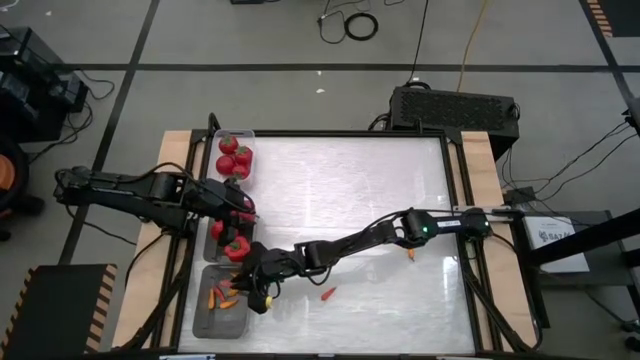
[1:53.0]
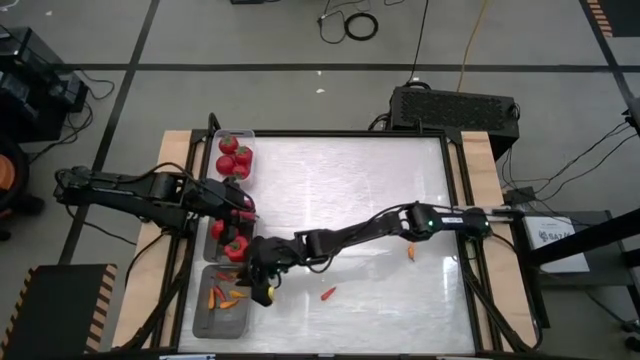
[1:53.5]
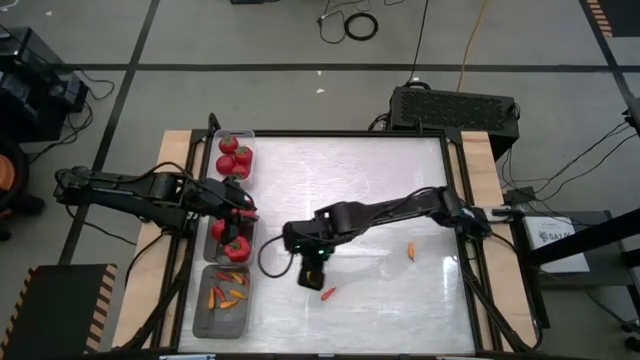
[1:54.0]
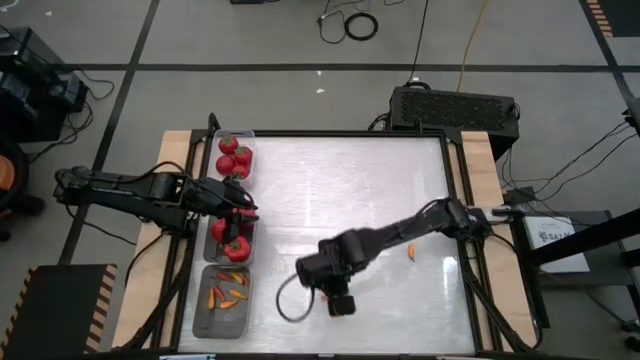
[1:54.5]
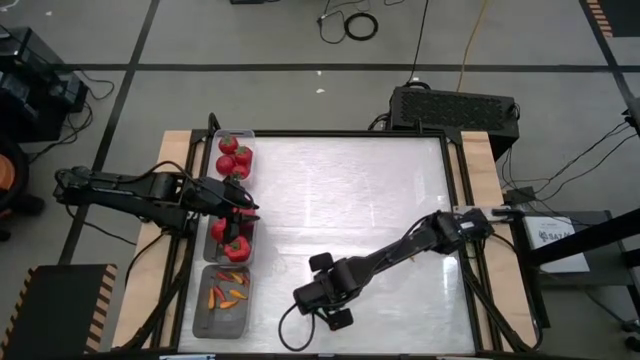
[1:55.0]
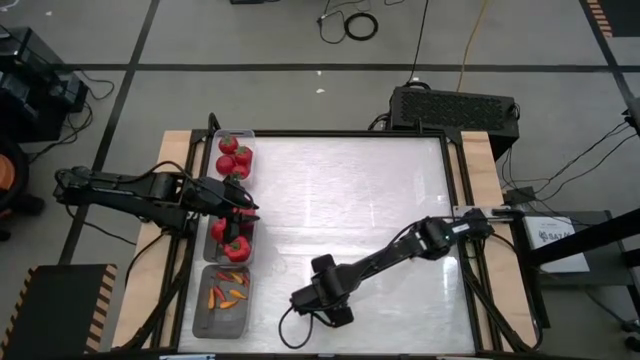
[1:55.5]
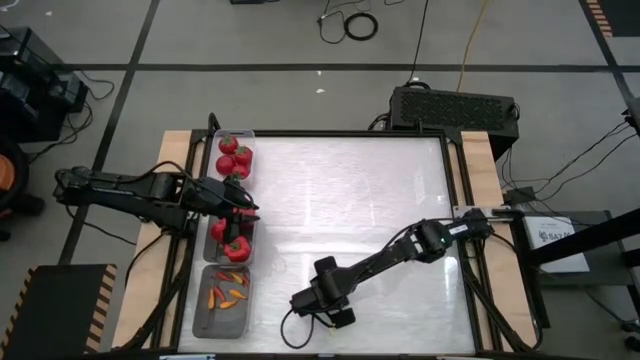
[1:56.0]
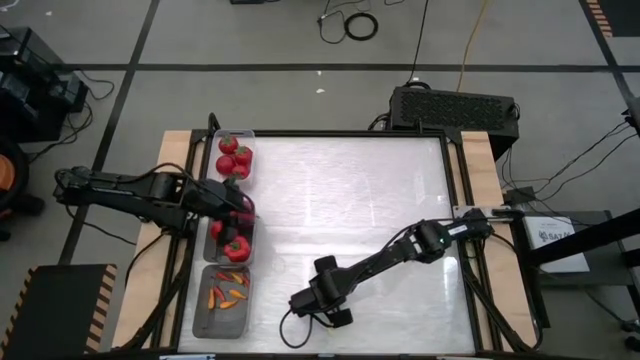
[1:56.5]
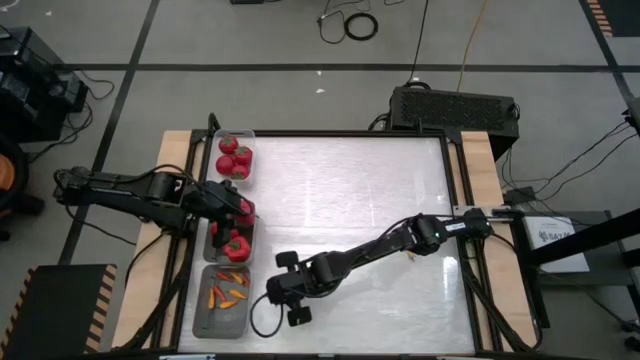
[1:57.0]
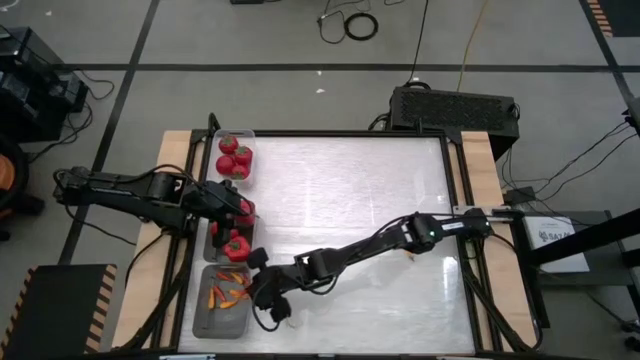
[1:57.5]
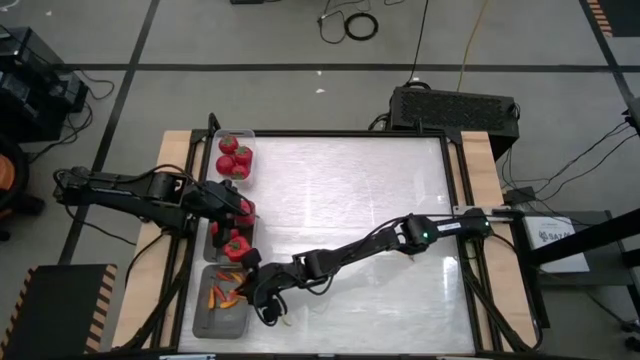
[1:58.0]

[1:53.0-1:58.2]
Task: Sort produce into baskets
Put the orange chili pepper into the bottom black bin

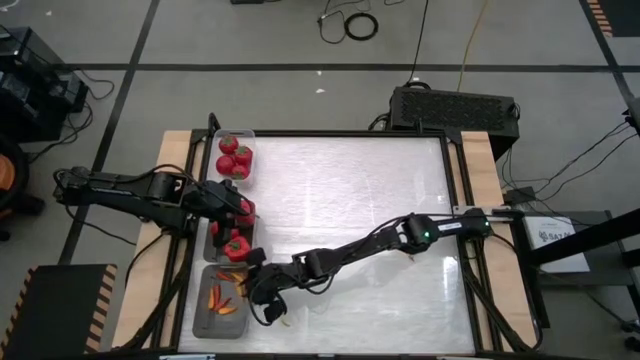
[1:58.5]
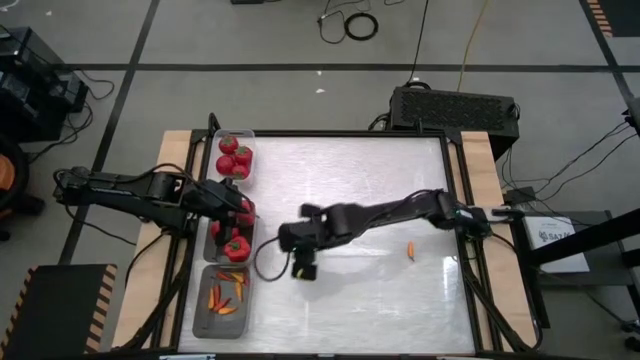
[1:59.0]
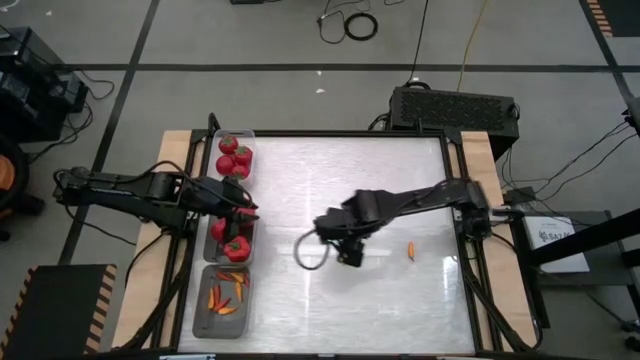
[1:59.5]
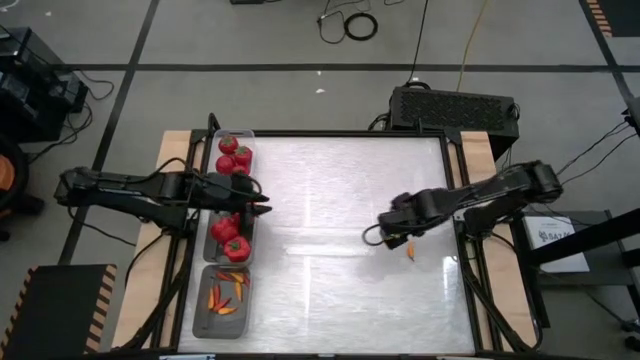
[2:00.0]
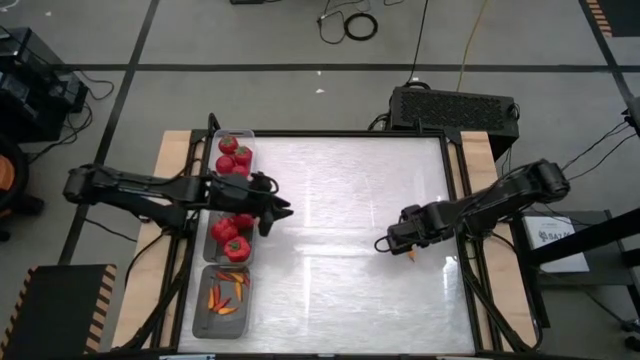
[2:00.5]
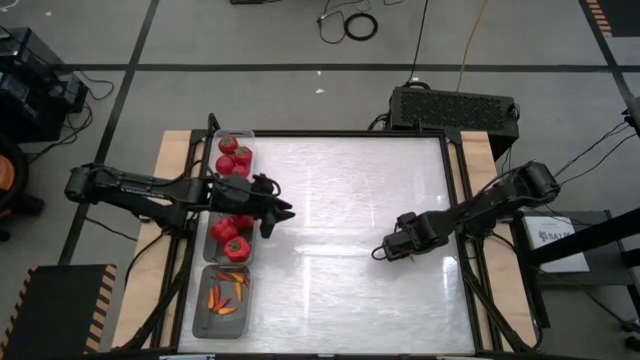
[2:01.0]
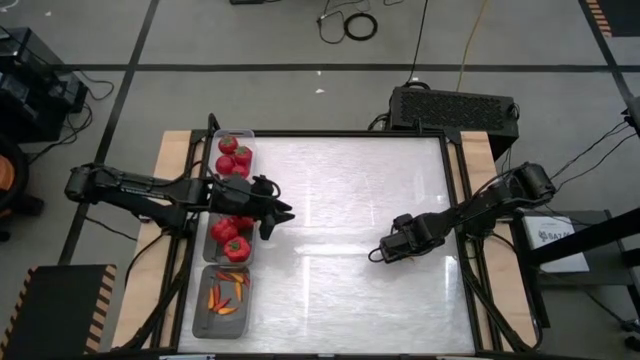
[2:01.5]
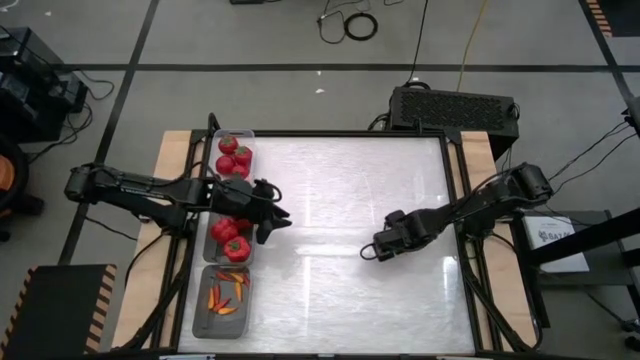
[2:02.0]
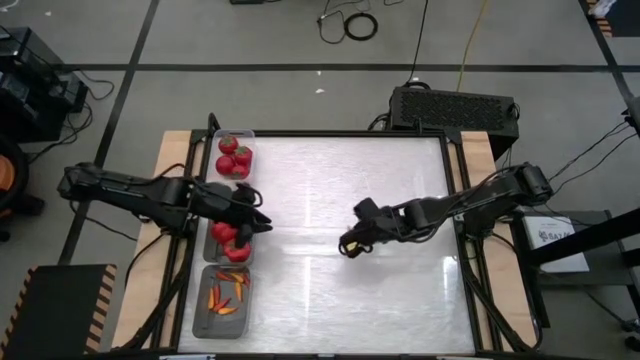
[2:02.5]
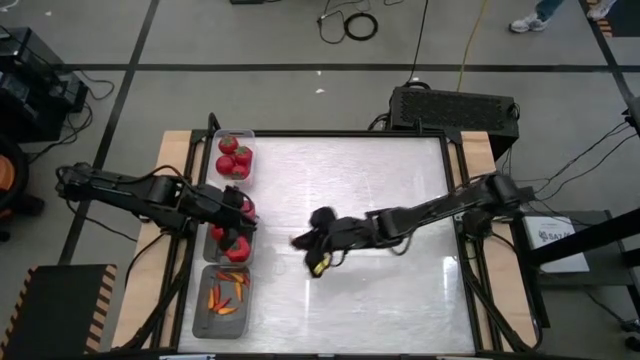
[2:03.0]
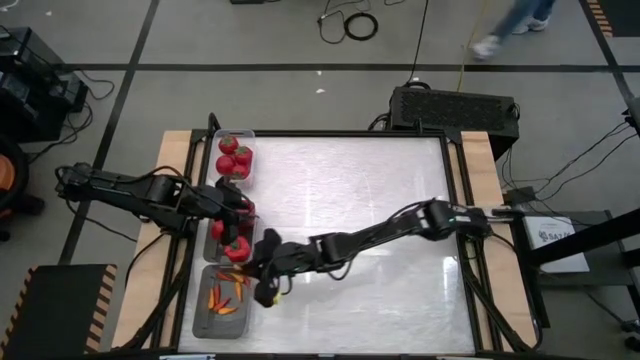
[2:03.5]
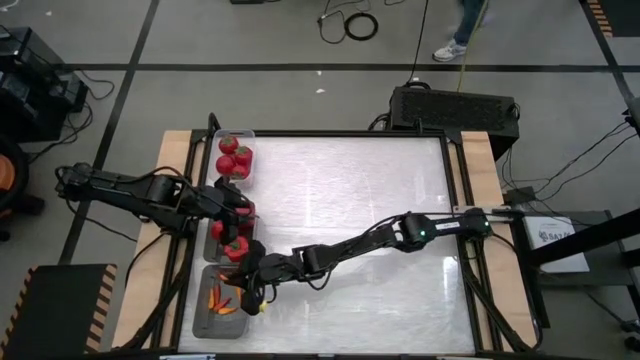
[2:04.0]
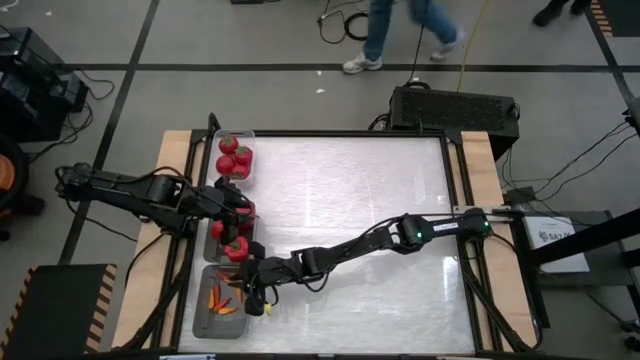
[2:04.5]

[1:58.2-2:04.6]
Put the yellow chili pepper into the bottom black bin

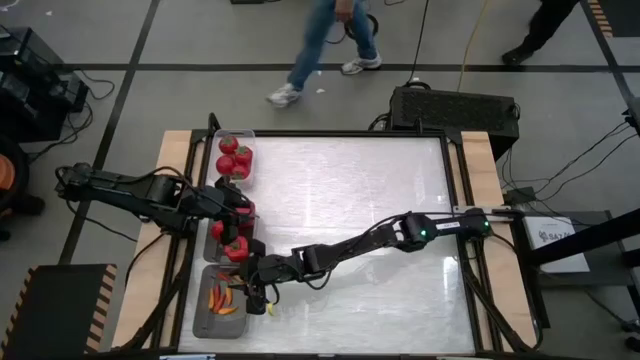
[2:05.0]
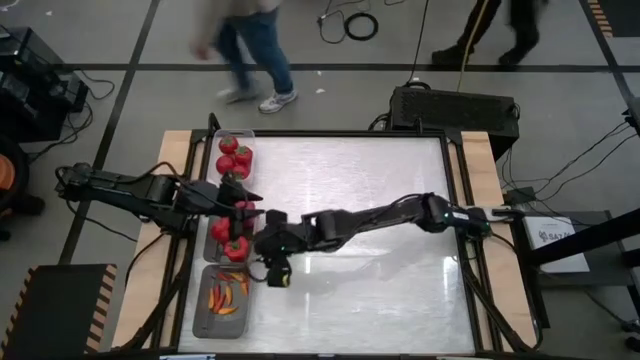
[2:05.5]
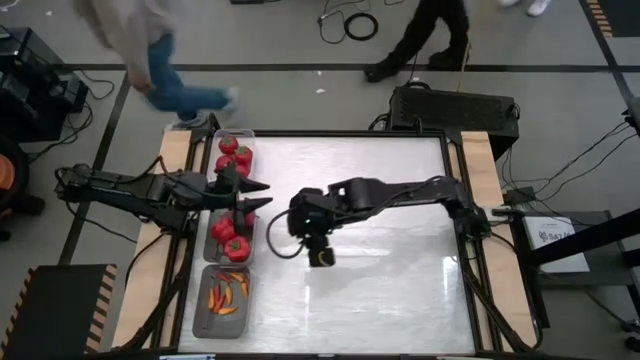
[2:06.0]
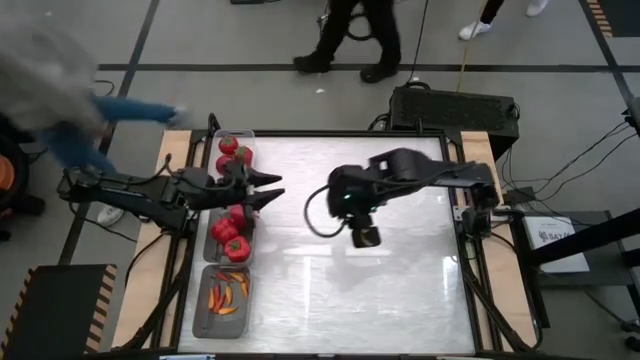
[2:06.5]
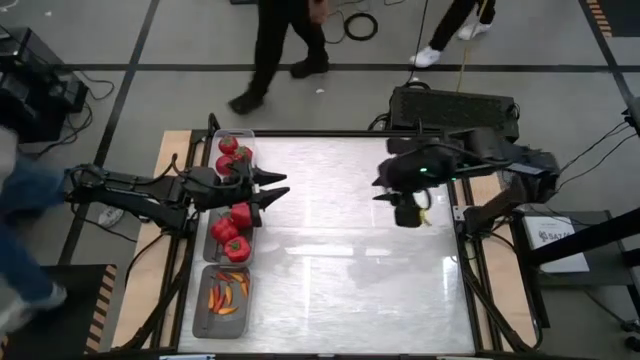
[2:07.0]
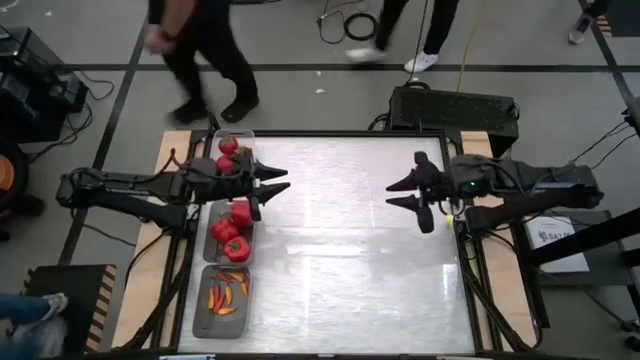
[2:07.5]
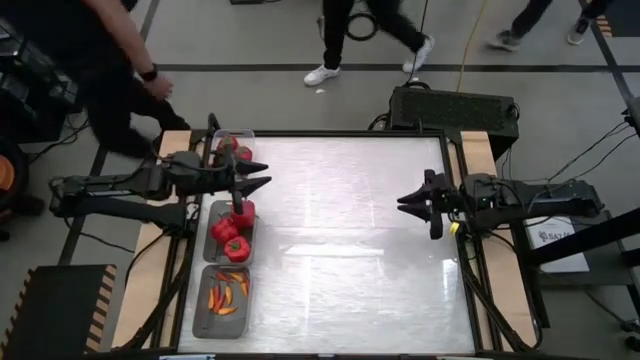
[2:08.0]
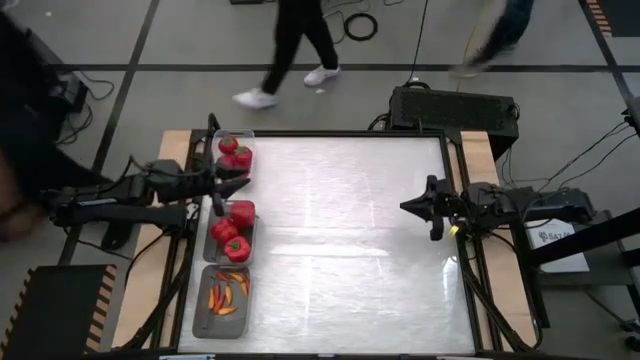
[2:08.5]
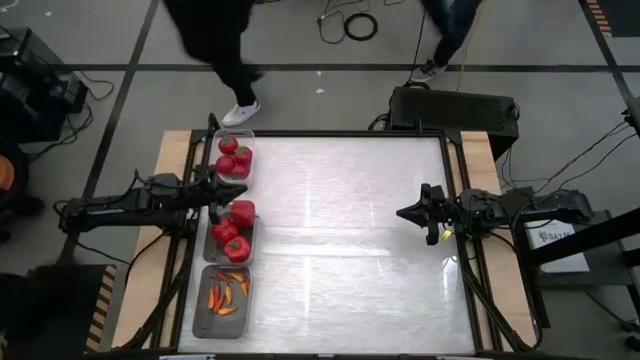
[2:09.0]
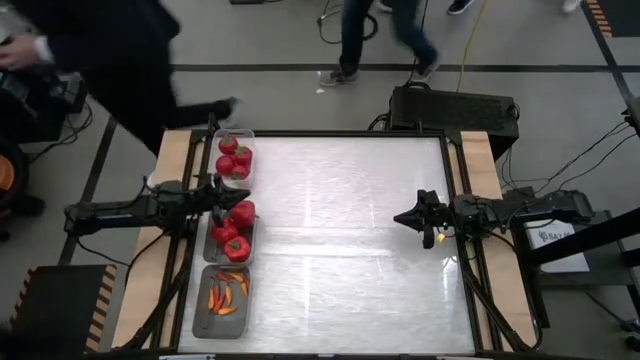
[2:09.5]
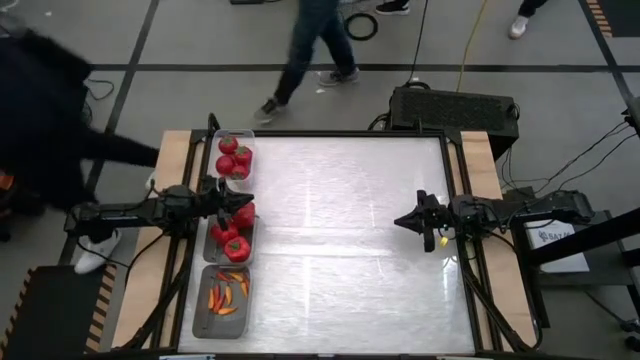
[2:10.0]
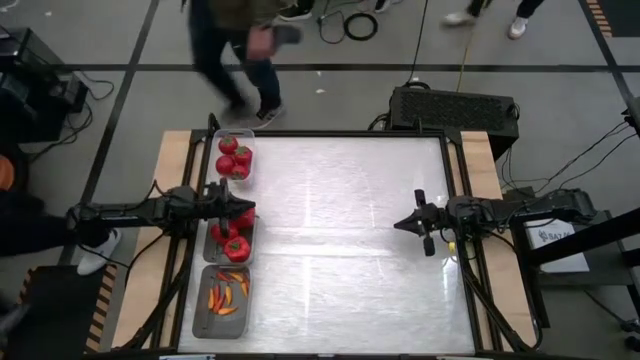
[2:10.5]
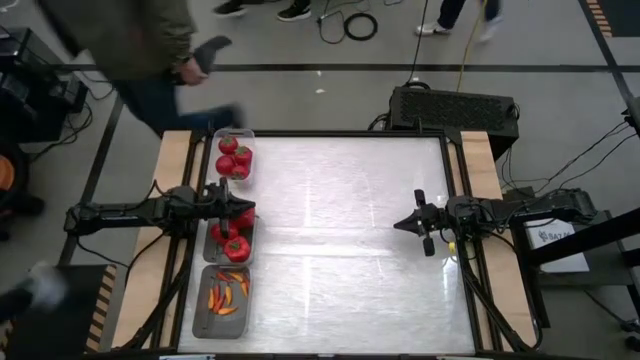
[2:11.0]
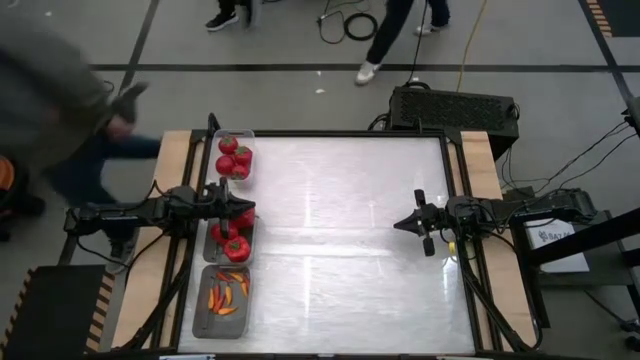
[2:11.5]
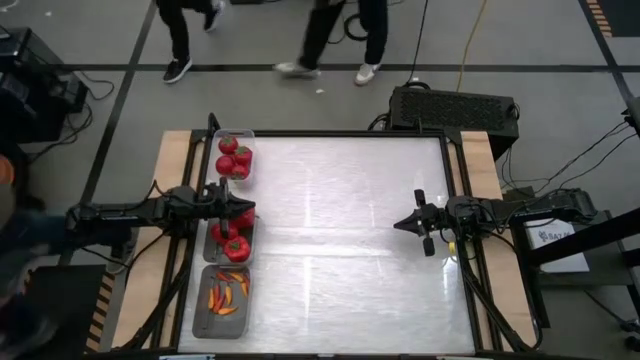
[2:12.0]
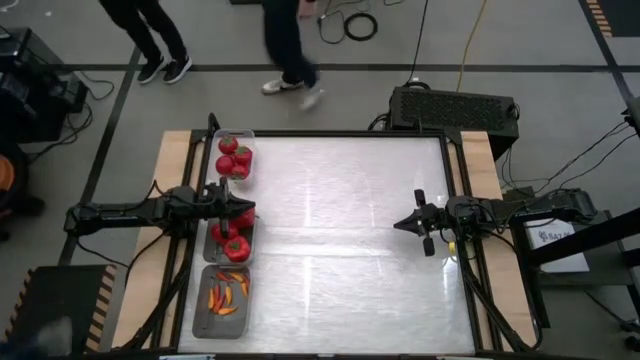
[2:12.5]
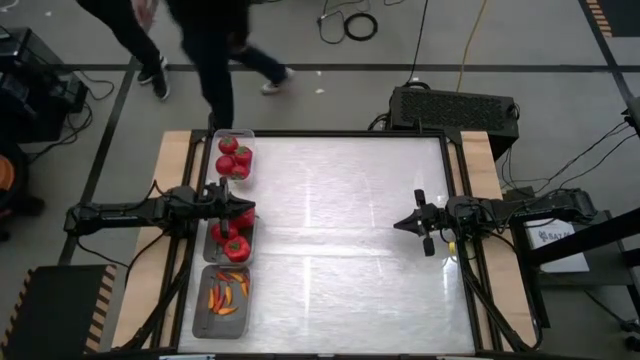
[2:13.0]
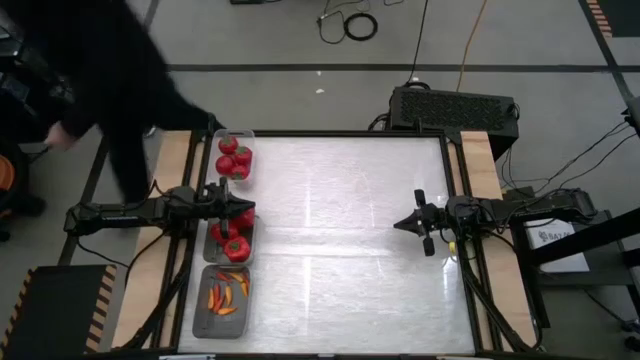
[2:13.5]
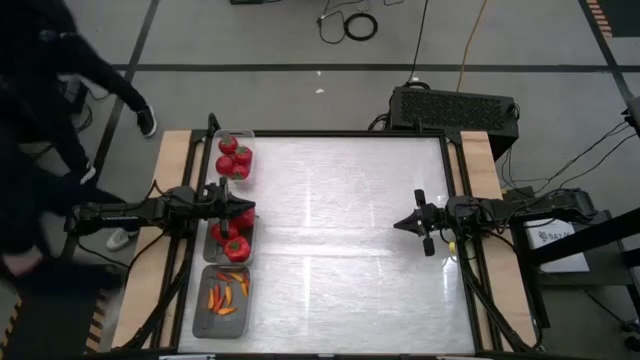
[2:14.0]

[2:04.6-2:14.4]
Return to Home Position
